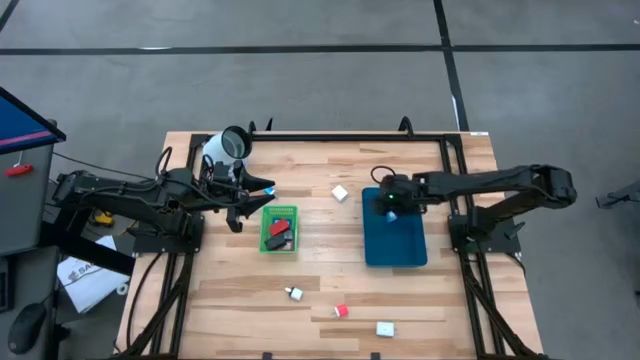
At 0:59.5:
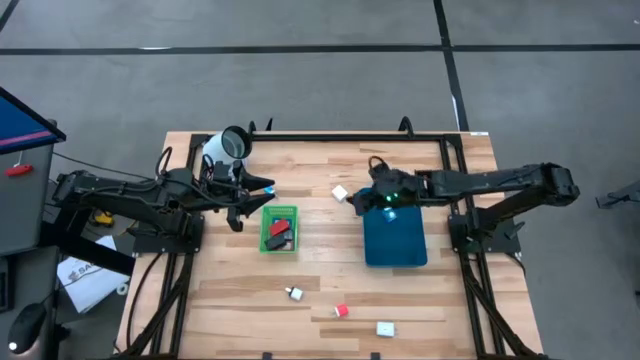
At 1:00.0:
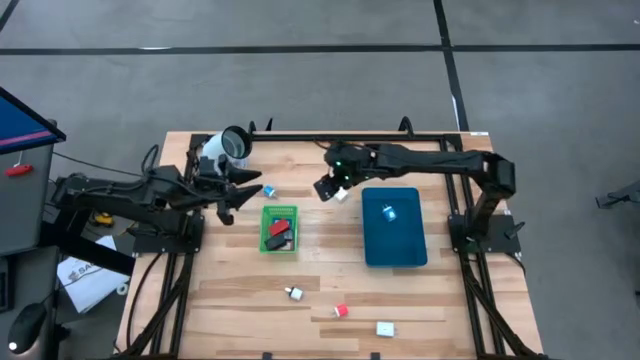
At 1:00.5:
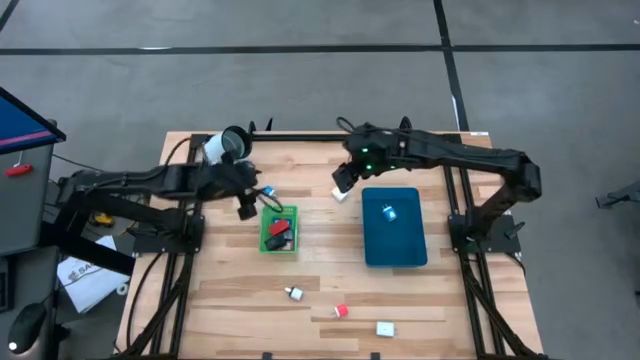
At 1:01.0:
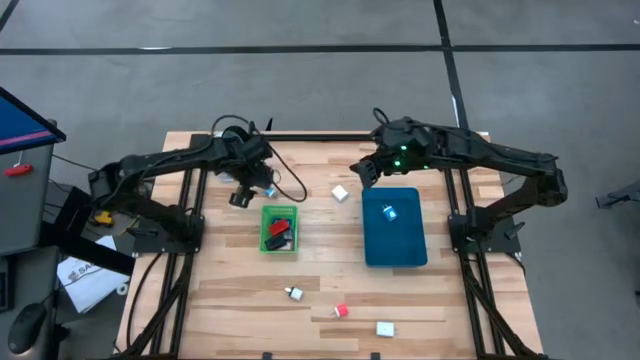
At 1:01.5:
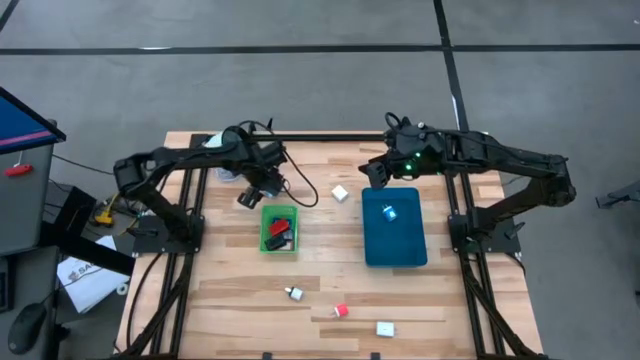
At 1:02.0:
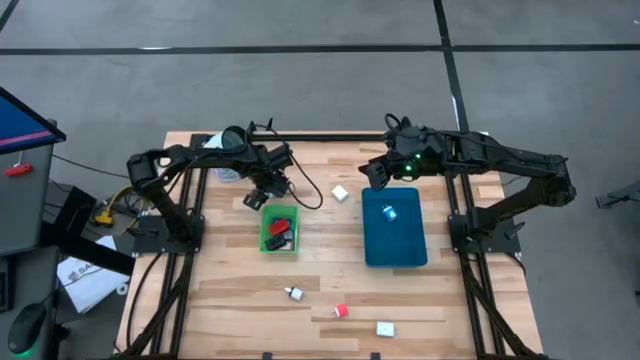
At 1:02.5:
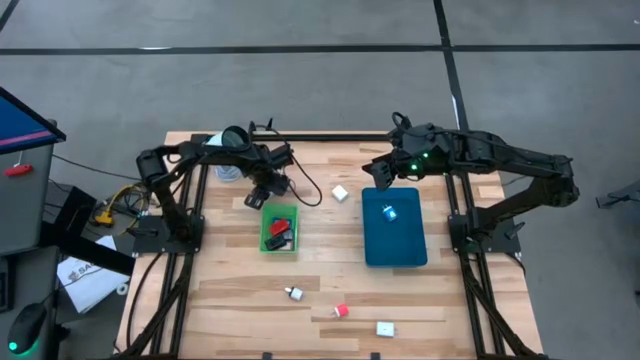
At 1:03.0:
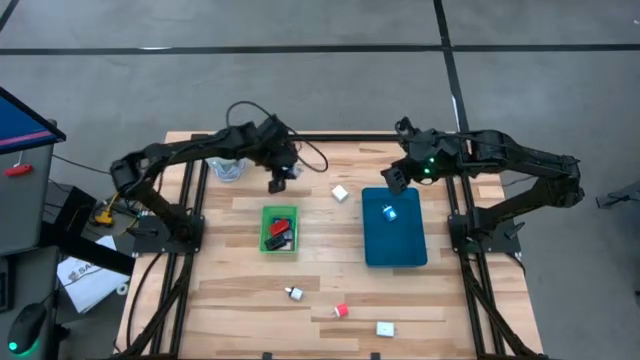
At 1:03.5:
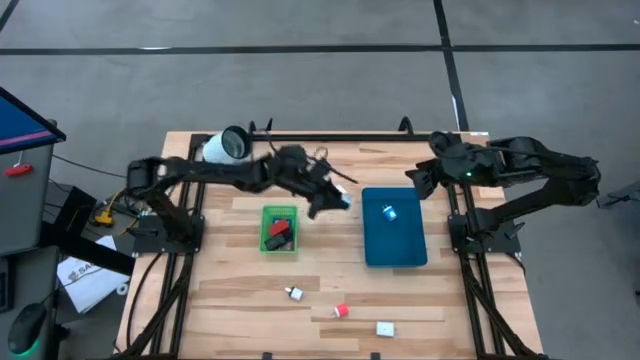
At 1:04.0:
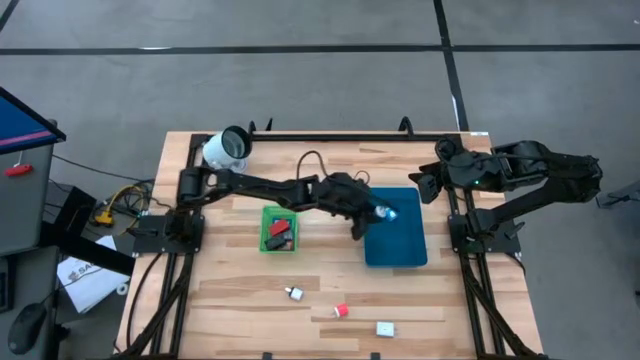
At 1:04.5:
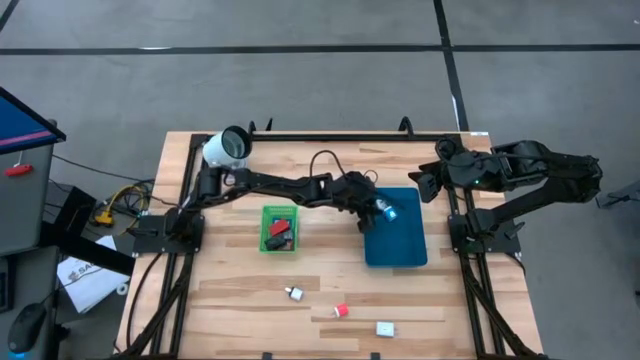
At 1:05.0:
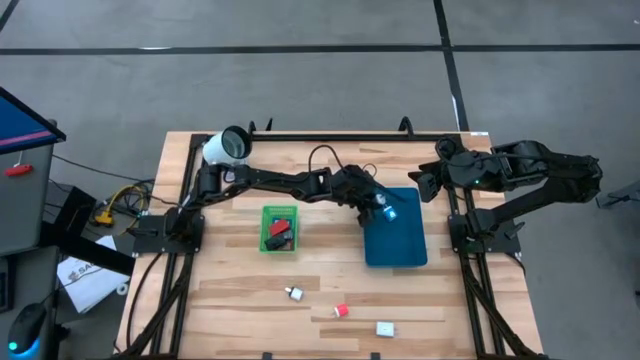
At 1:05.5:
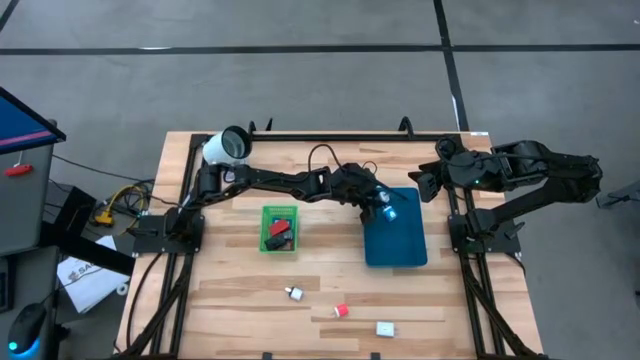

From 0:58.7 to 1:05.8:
Task: Pick & Place Office items
Put the blue charger adapter into the blue bin

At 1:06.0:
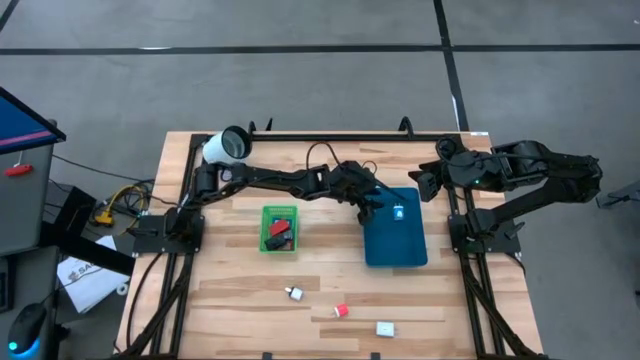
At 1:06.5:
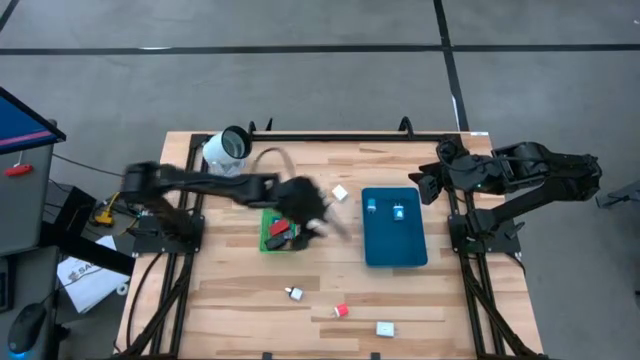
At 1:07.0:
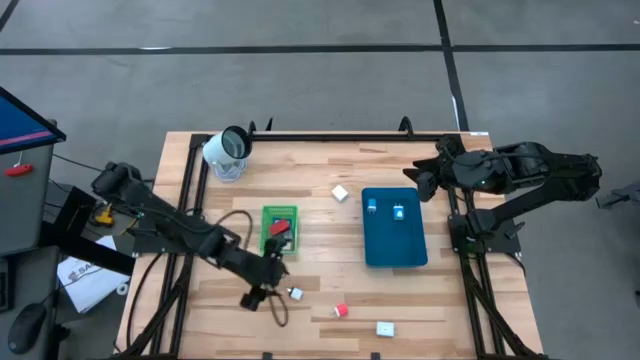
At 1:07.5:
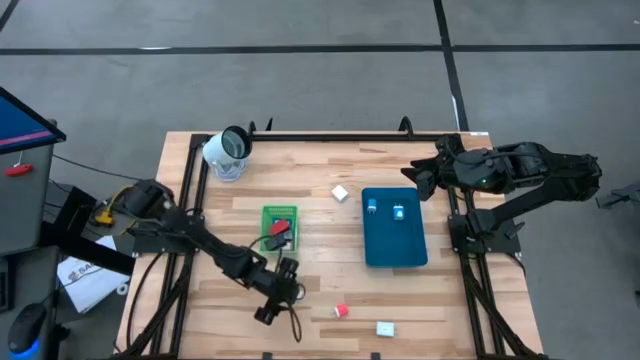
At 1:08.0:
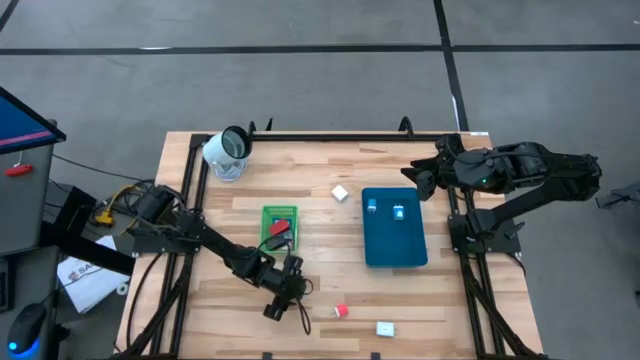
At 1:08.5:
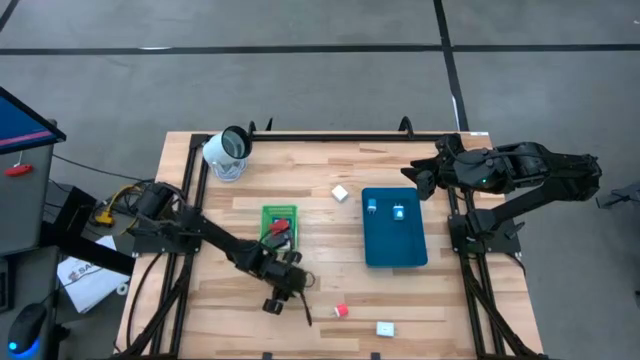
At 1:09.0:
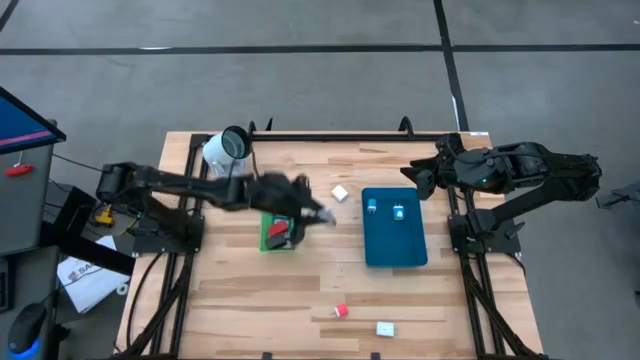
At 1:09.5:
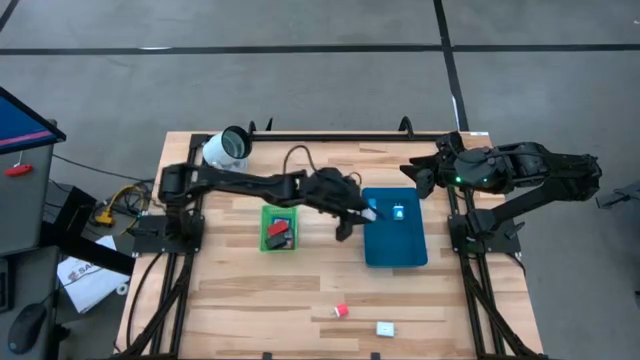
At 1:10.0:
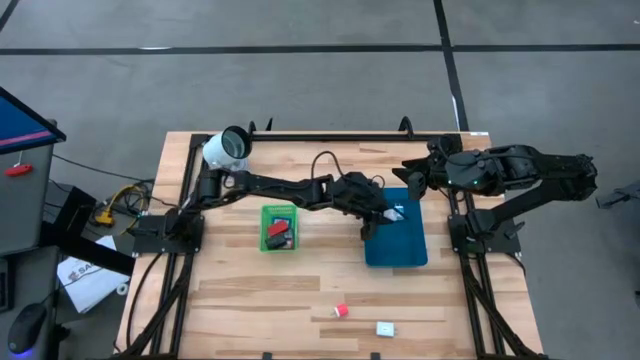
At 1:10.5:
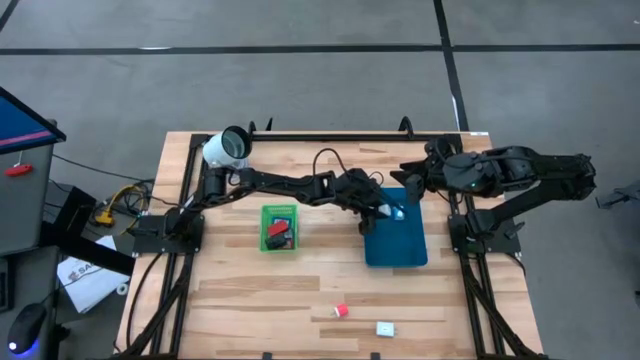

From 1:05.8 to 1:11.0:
Put the black white charger adapter into the blue bin

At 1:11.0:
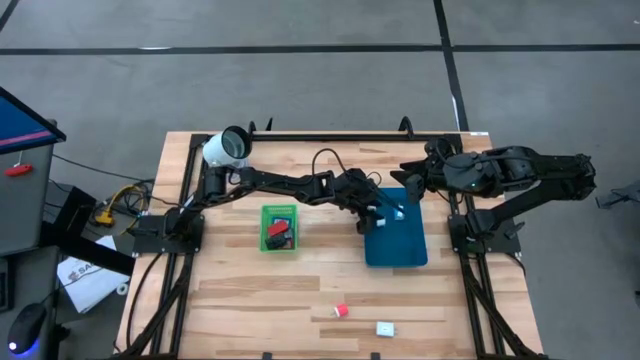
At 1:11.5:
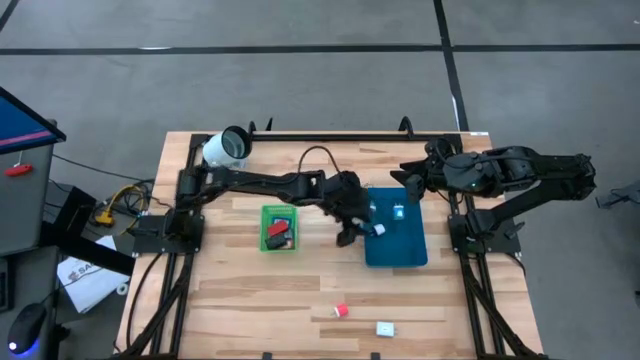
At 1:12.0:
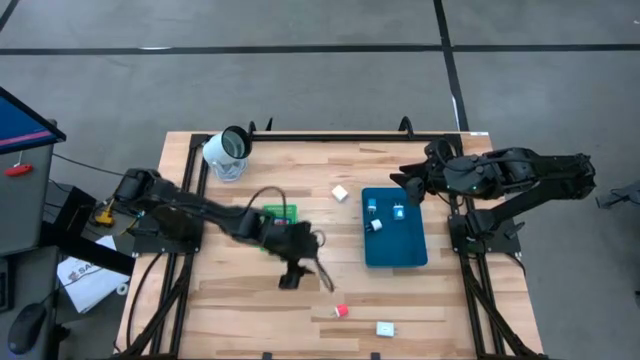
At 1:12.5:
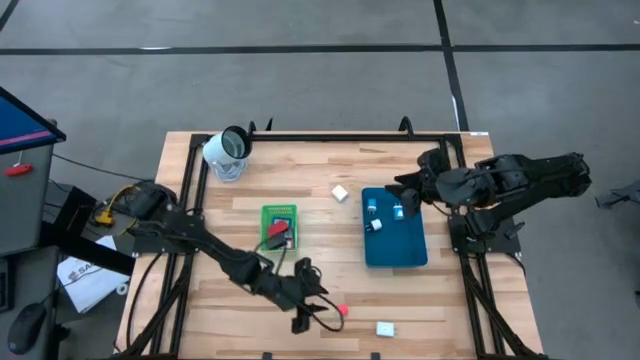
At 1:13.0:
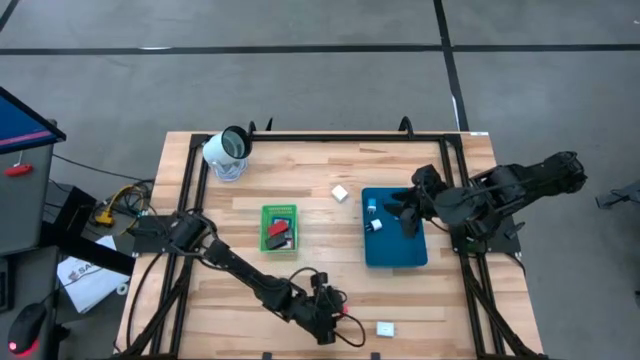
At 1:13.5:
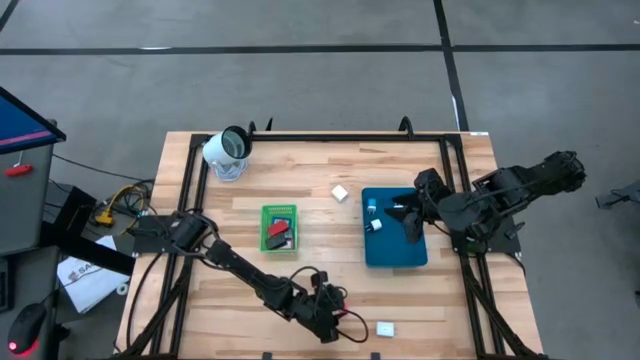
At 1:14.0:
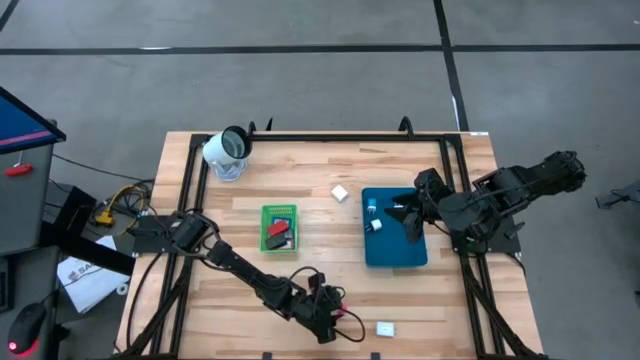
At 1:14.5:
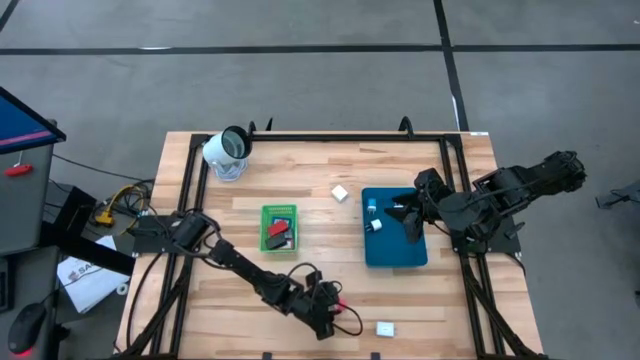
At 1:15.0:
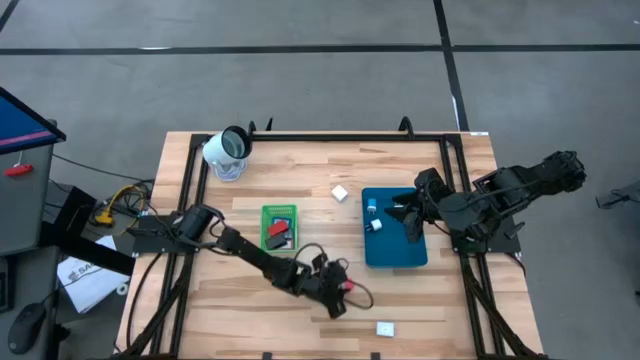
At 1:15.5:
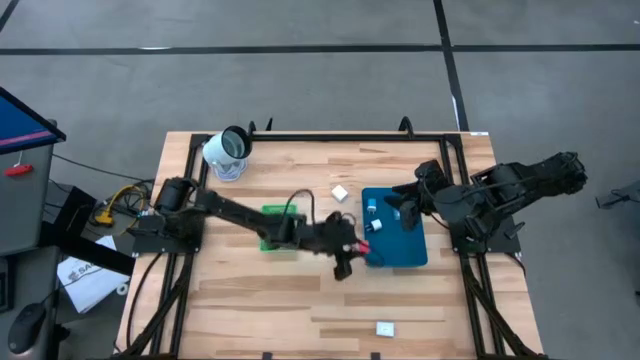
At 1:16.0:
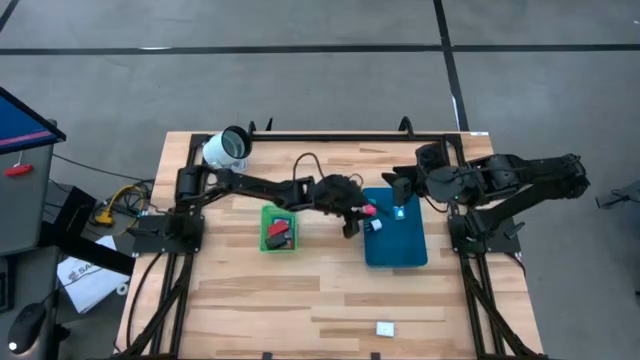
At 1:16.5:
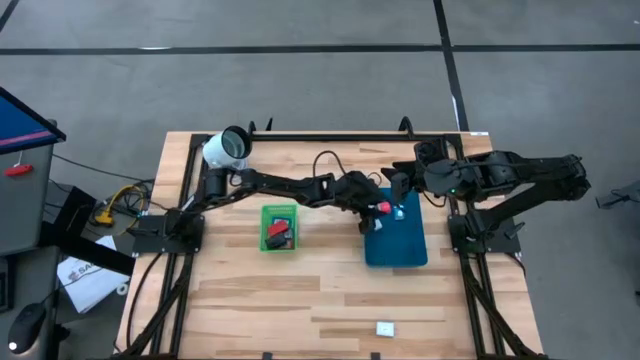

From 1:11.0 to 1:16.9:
Put the pink charger adapter into the blue bin

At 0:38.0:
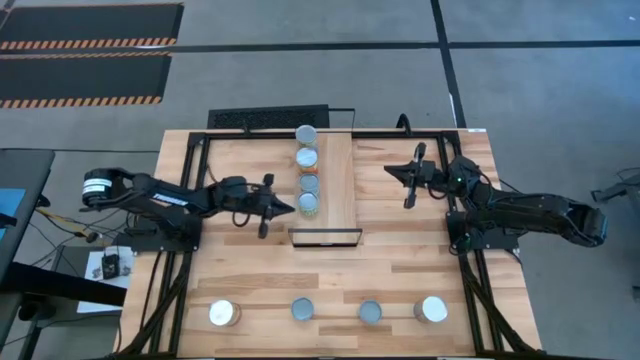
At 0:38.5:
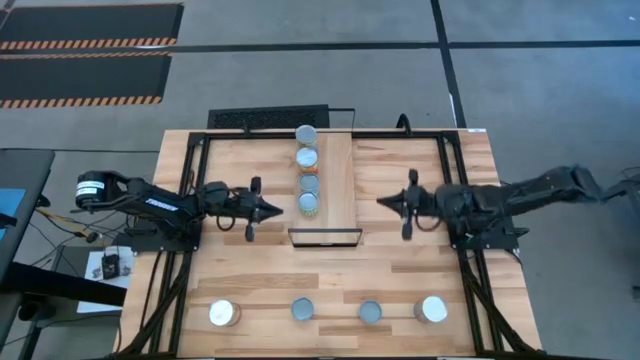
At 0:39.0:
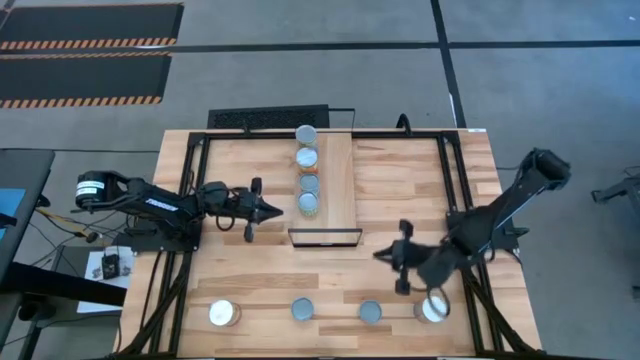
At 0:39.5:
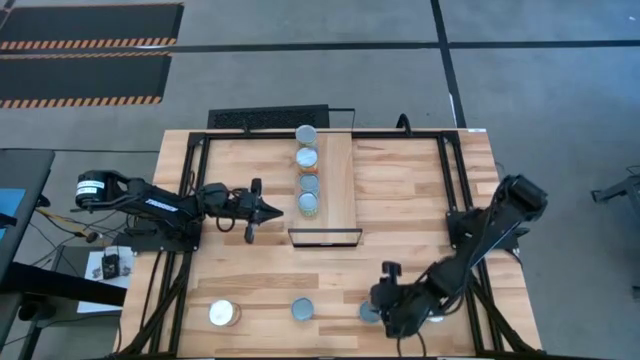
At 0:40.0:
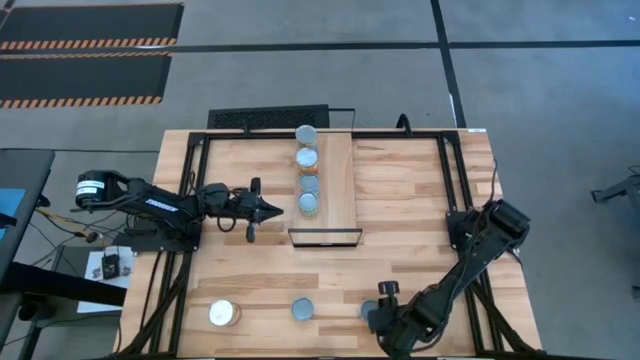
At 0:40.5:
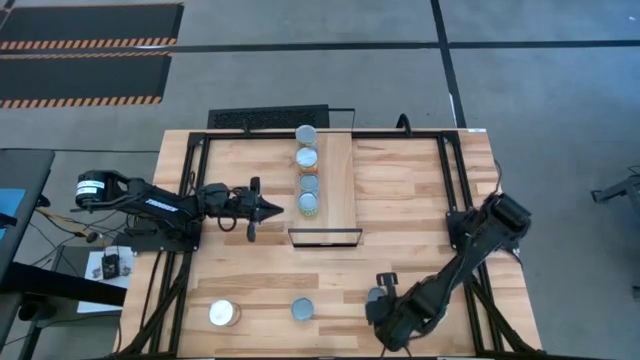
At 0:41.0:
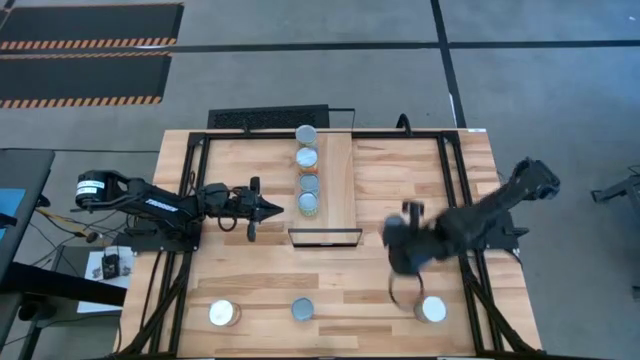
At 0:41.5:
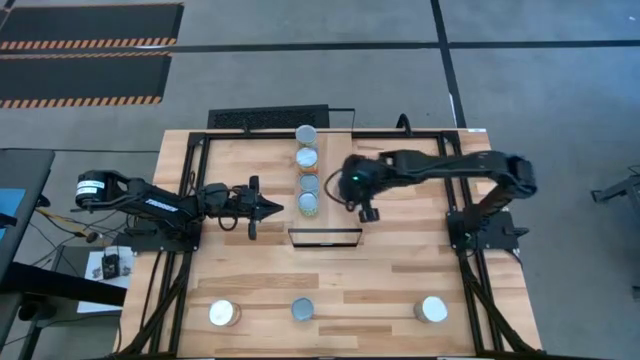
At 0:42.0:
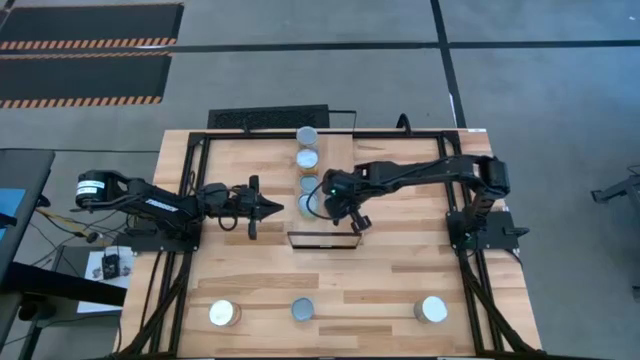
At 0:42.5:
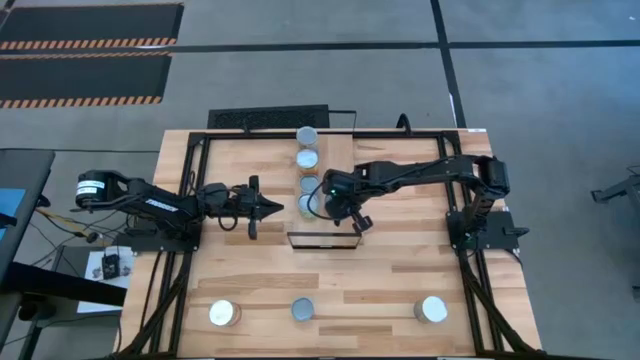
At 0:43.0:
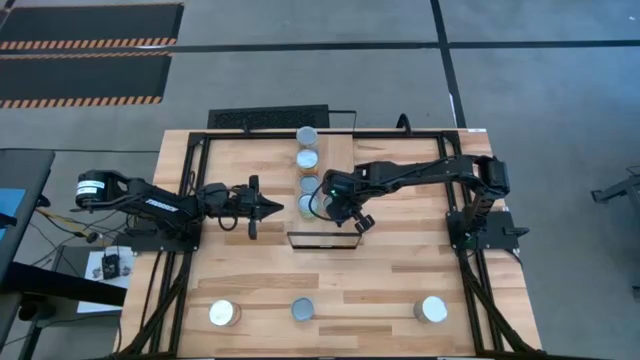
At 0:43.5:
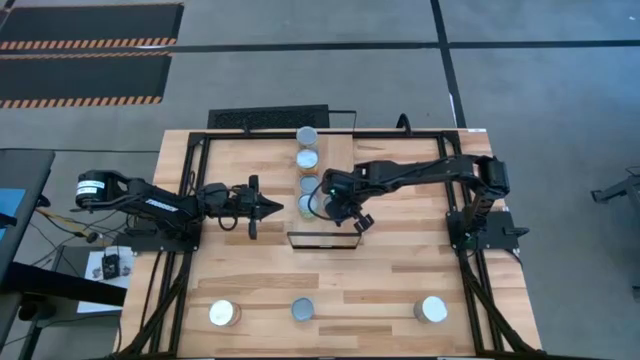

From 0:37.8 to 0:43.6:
Task: Pick and place cans onto a shelf
Put the canned oranges on the shelf
